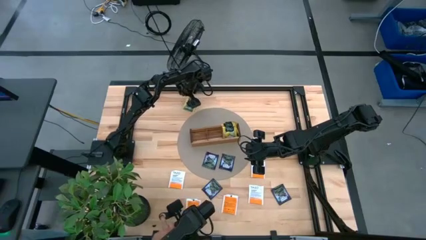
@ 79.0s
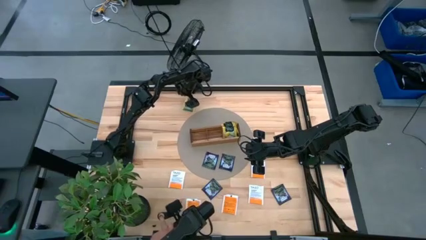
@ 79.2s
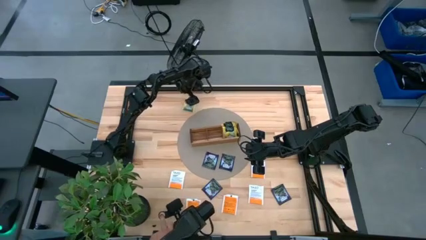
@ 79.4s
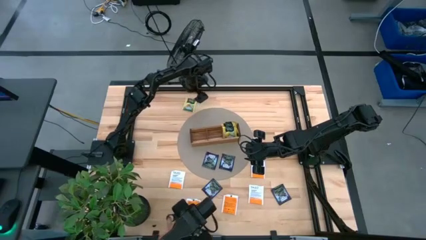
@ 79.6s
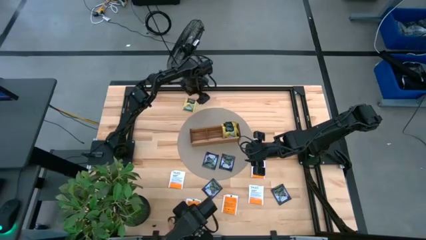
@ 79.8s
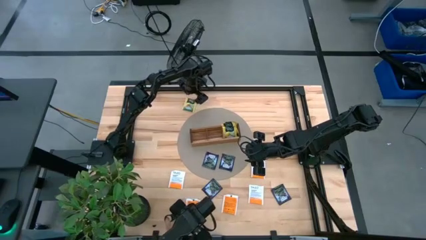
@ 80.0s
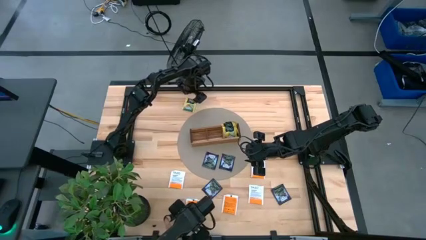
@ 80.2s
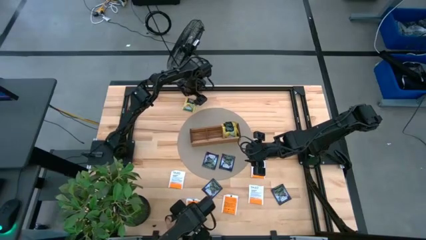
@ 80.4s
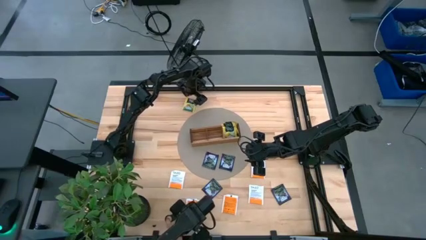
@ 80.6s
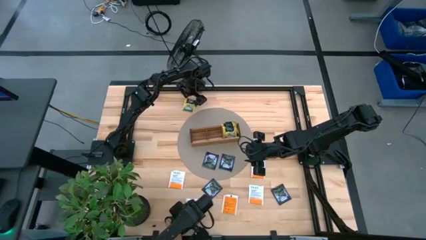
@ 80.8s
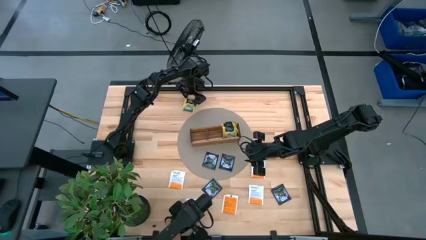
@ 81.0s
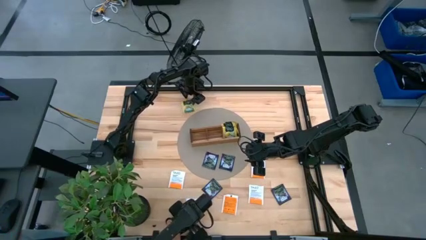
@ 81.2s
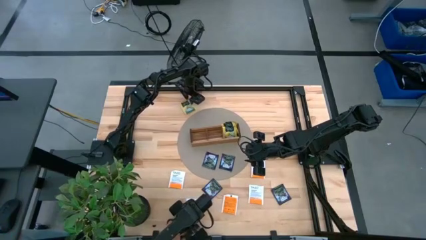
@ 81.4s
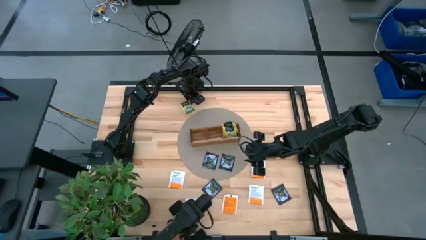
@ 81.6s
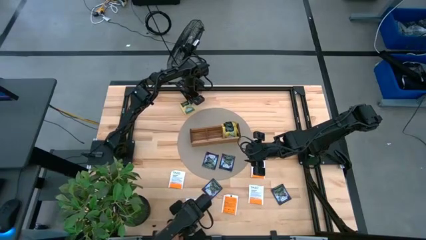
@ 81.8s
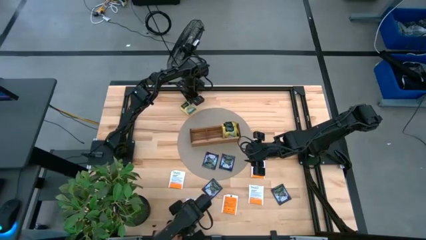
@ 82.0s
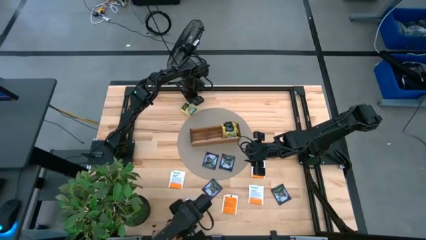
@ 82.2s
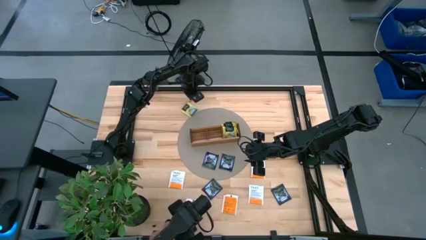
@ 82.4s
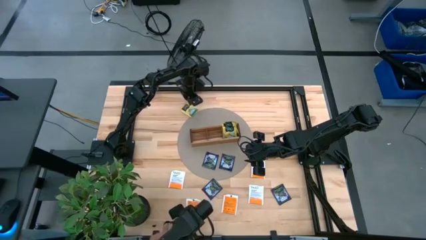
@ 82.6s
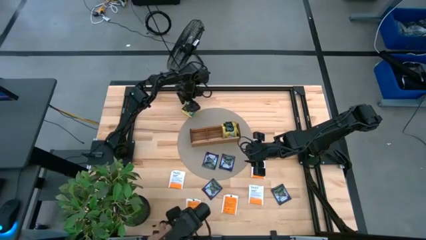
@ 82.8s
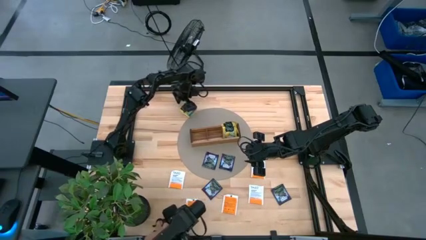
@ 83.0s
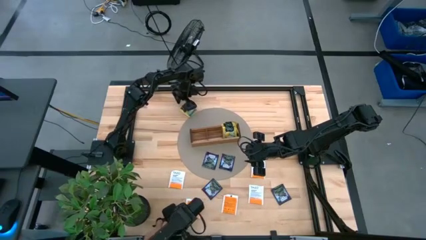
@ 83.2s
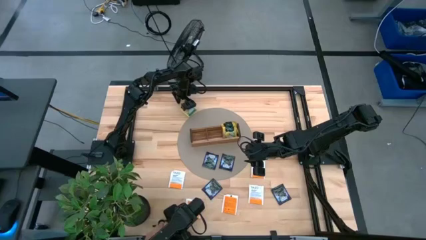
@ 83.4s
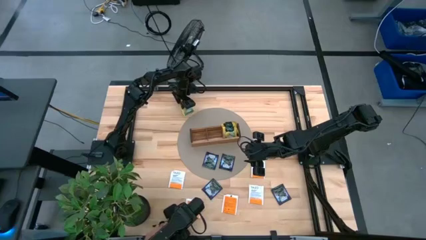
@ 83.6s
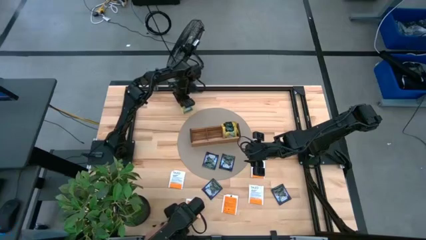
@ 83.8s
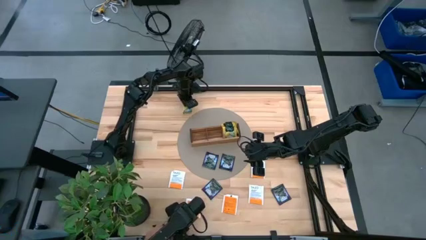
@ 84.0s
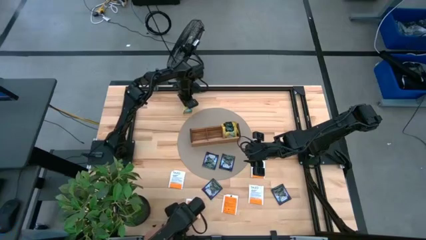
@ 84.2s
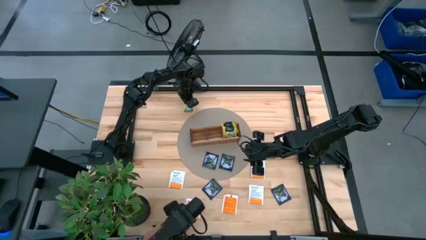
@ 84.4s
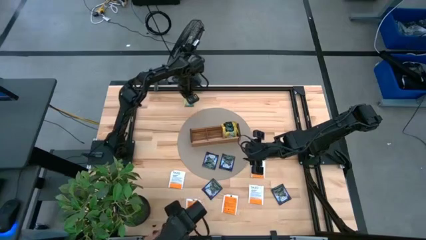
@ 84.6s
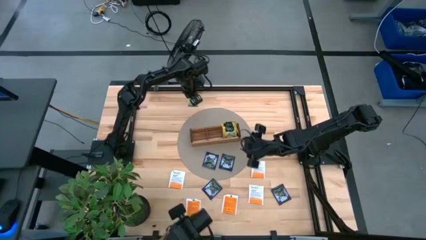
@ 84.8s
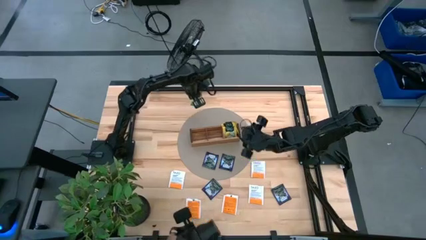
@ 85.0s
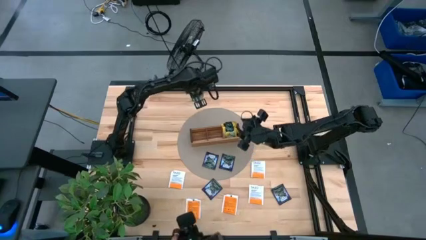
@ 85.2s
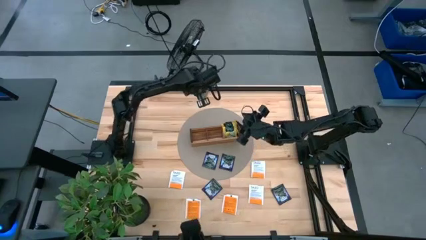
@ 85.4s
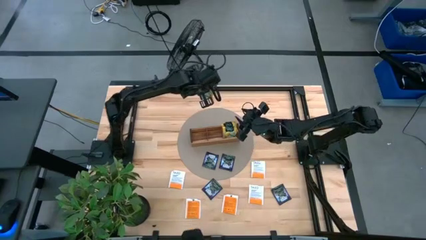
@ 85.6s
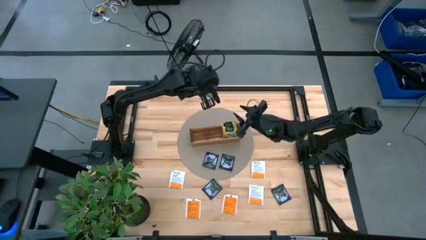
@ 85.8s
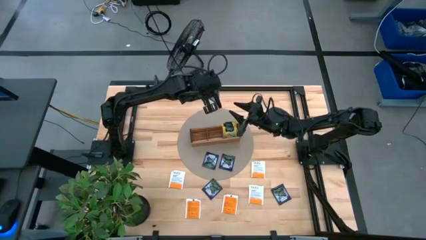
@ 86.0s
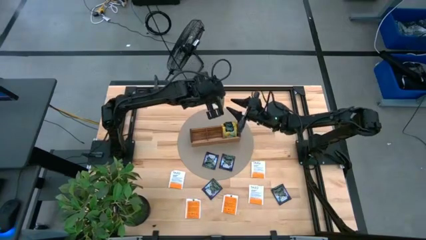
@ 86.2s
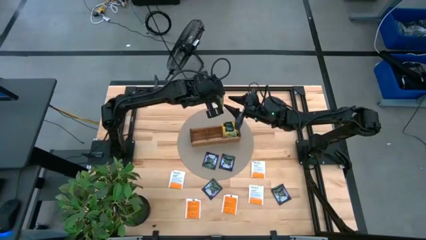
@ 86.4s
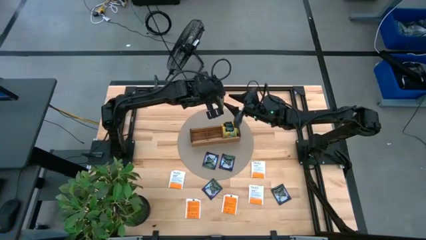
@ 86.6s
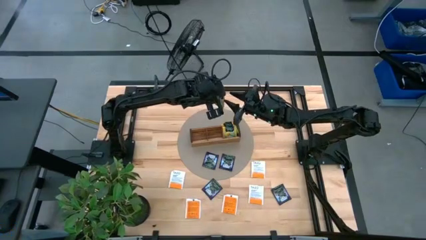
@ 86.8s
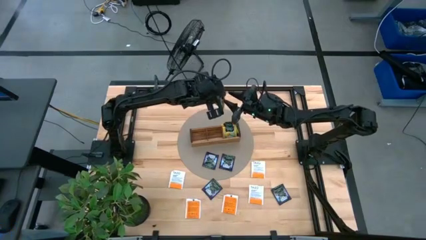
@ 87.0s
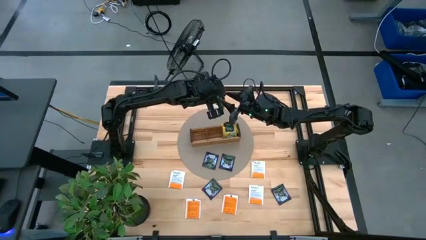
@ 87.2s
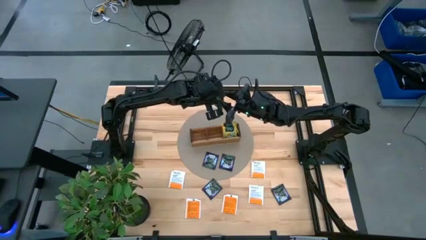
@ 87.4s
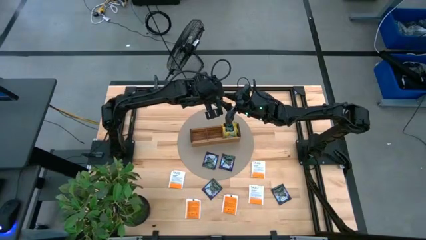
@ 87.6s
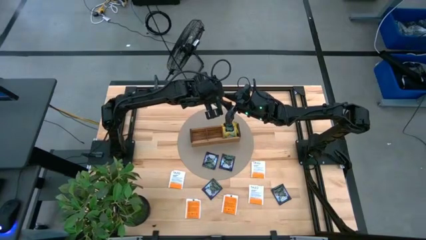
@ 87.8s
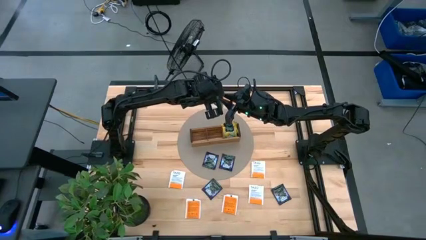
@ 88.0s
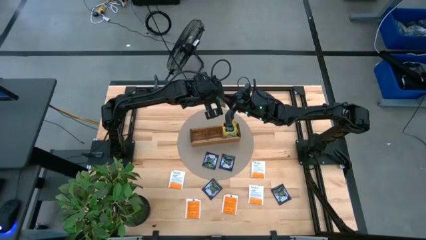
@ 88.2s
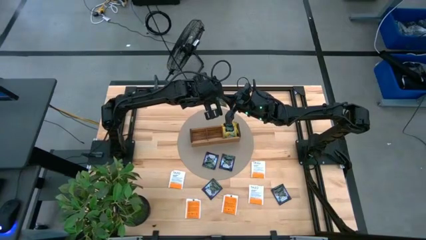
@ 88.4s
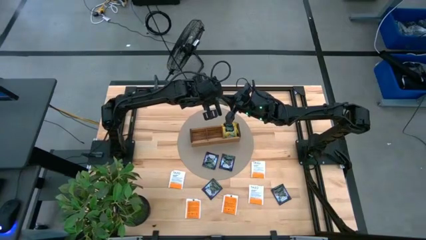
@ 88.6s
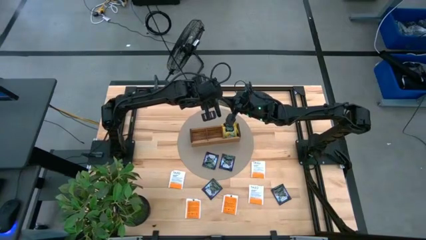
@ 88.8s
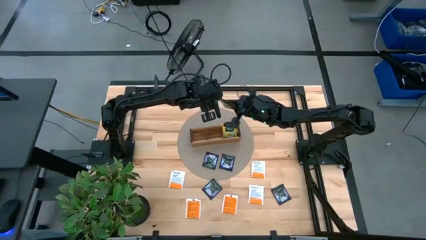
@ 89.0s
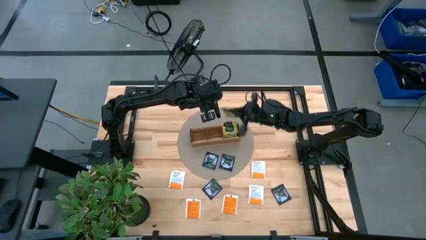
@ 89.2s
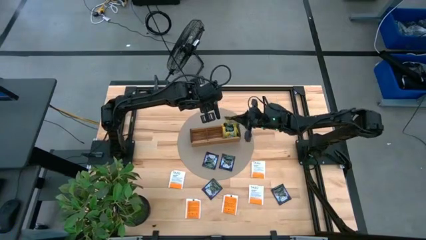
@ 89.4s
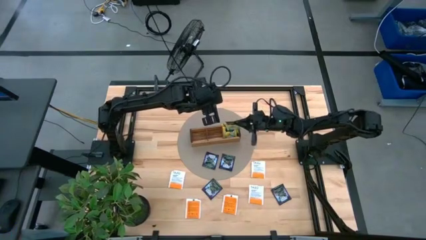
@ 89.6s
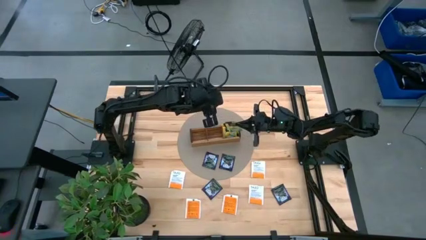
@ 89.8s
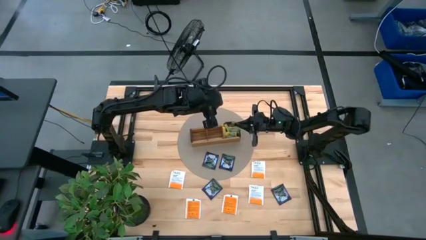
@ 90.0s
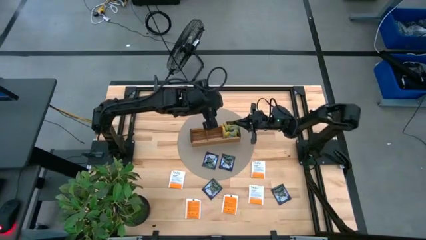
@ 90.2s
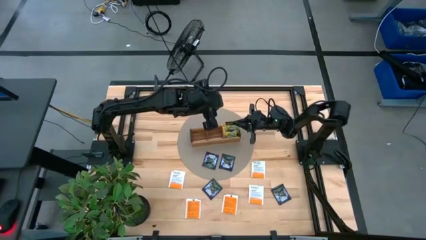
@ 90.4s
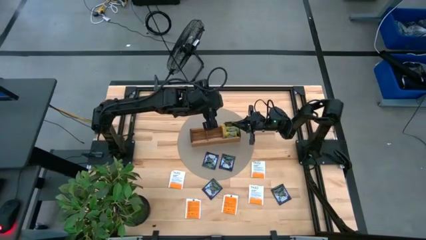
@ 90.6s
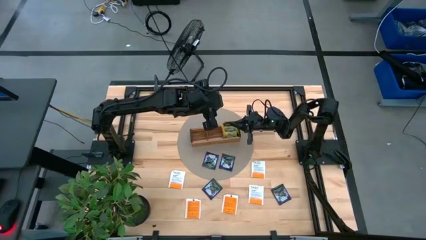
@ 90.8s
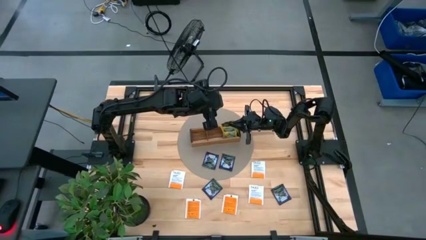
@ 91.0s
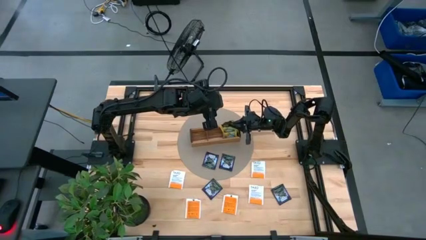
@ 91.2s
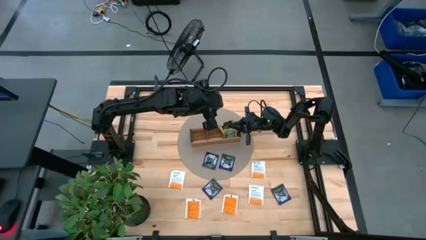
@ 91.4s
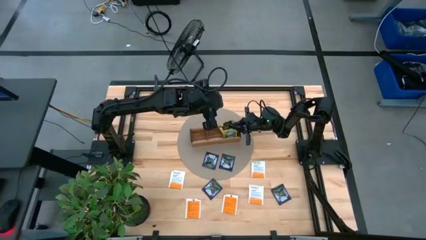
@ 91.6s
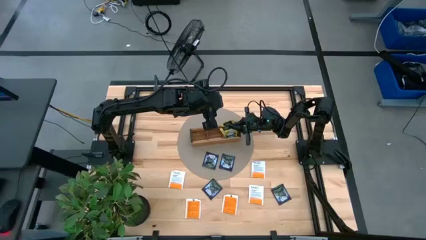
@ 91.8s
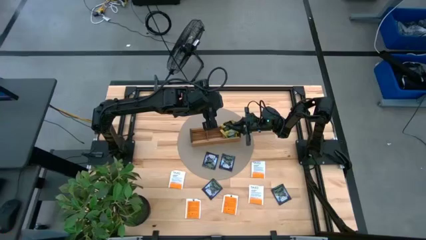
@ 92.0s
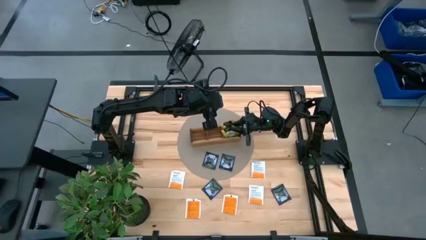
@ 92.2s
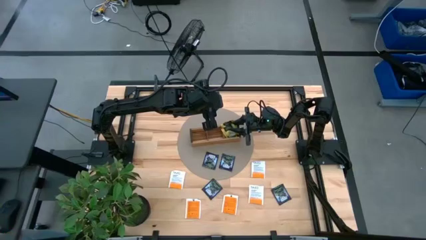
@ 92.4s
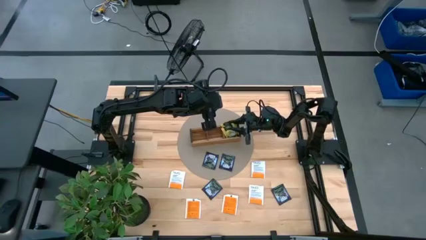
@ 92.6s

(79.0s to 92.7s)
Task: Pick & Place Tea
Put the yellow tea bag into the right section of the wooden organizer

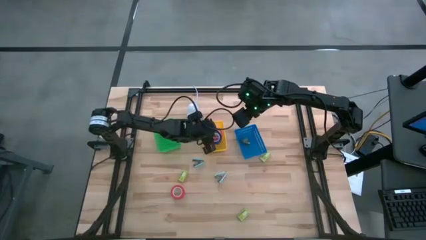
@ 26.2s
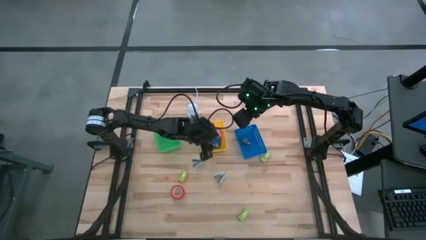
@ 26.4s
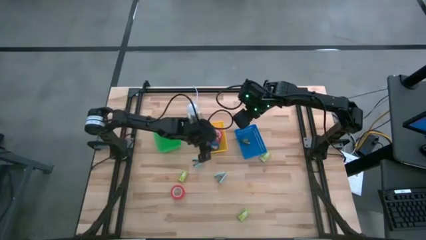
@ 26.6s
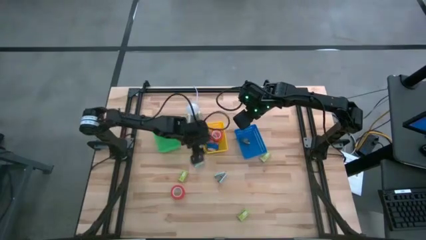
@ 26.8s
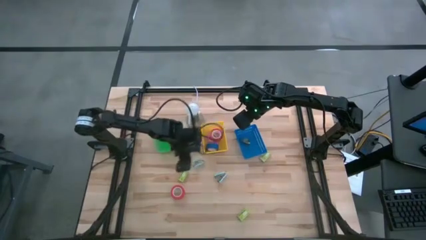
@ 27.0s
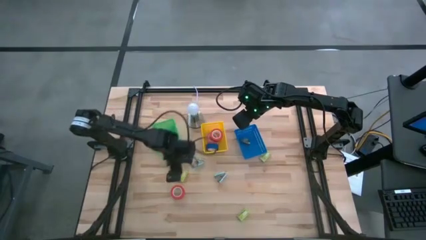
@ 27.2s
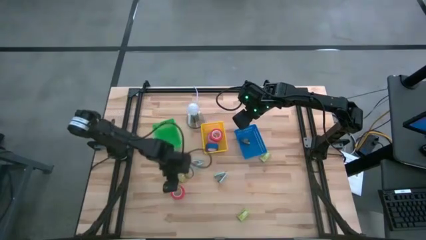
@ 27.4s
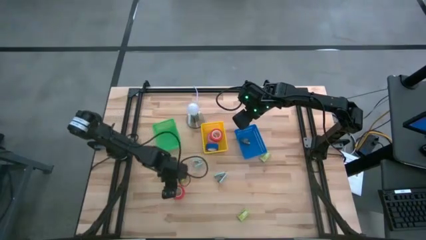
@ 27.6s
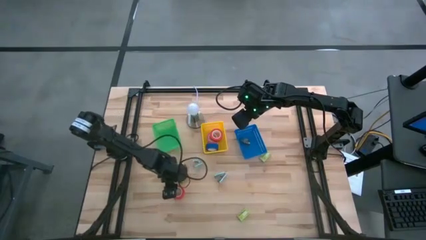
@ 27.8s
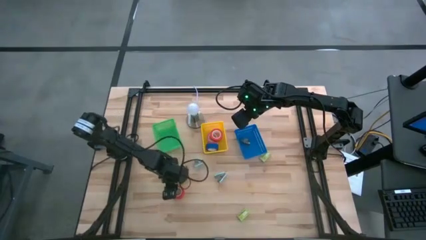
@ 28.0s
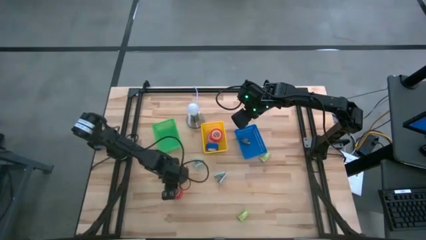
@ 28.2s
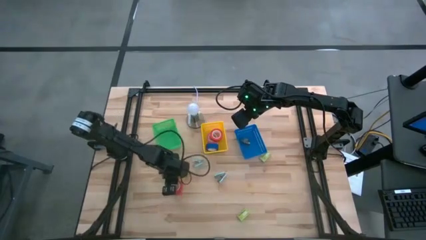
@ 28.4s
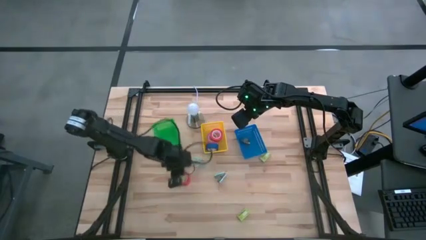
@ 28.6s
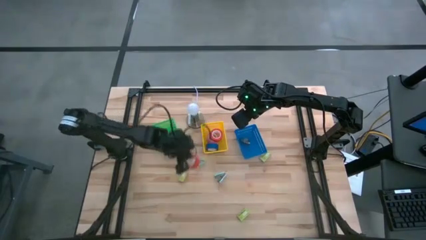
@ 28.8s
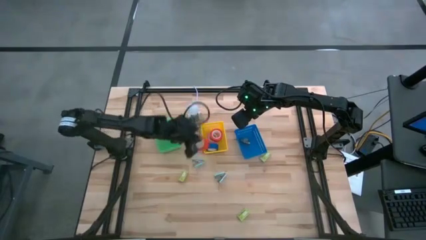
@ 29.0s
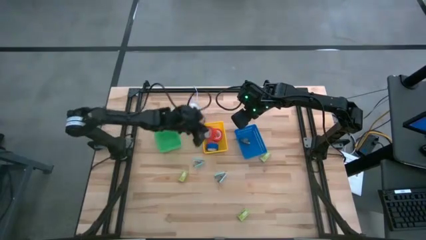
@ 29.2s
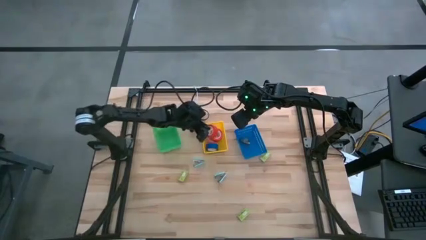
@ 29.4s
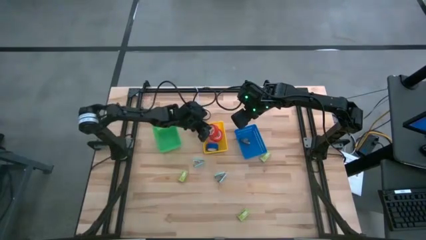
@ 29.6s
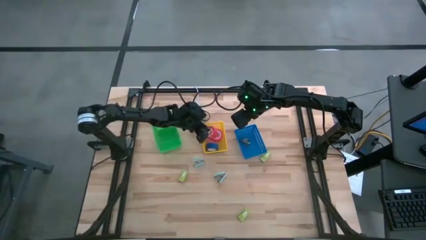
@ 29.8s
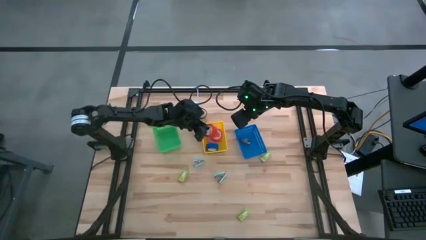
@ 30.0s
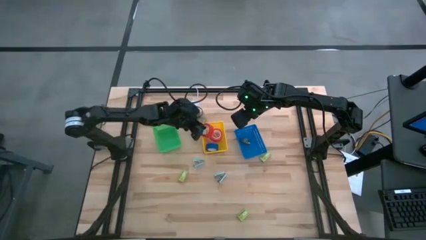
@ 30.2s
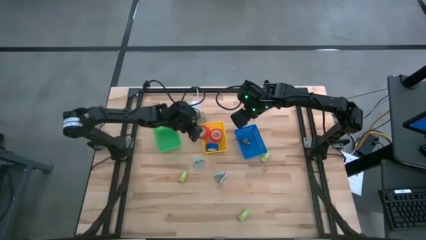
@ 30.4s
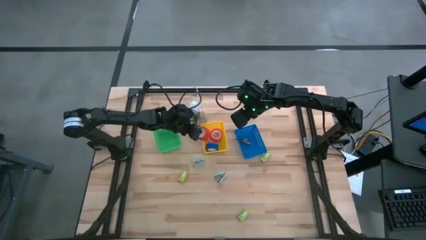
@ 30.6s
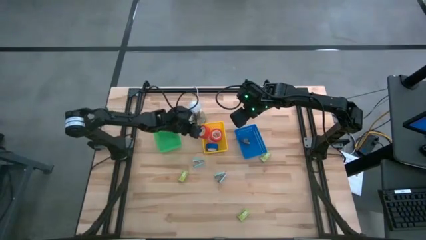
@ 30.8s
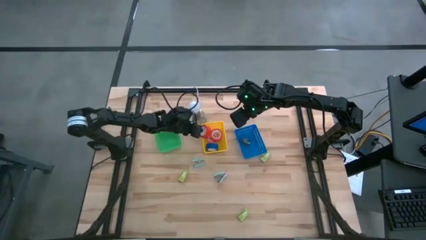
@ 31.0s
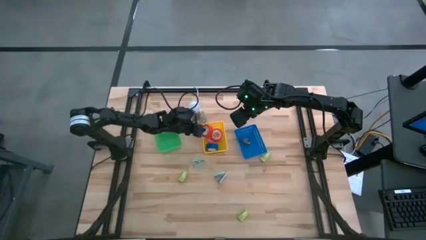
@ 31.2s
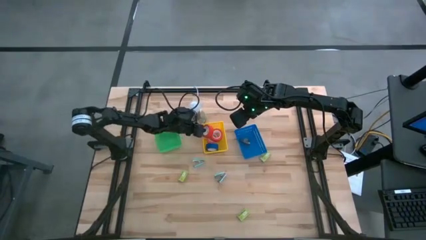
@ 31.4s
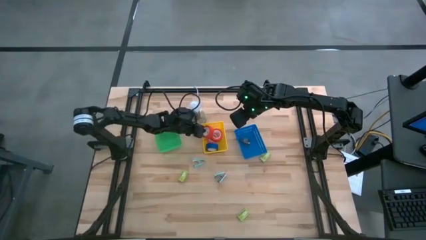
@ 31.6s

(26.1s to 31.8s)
Task: Pick and place Stapler, Stapler remover, tape
Put the red tape into the yellow basket
